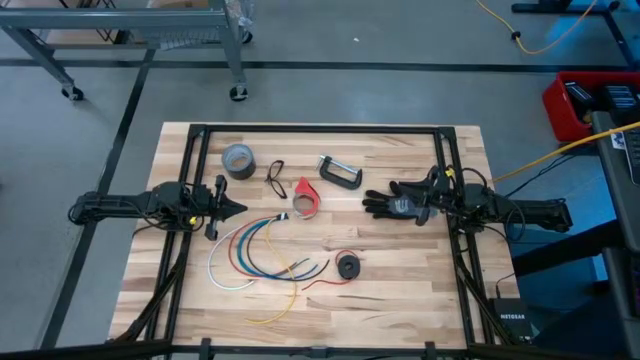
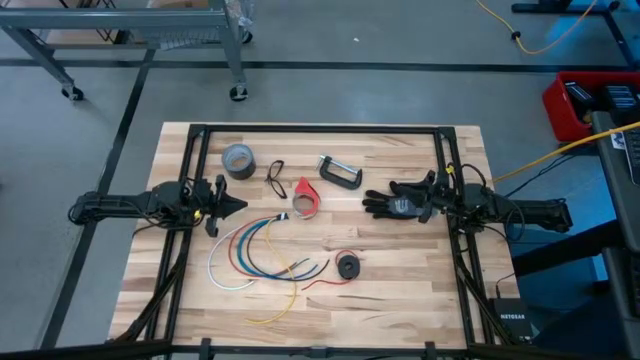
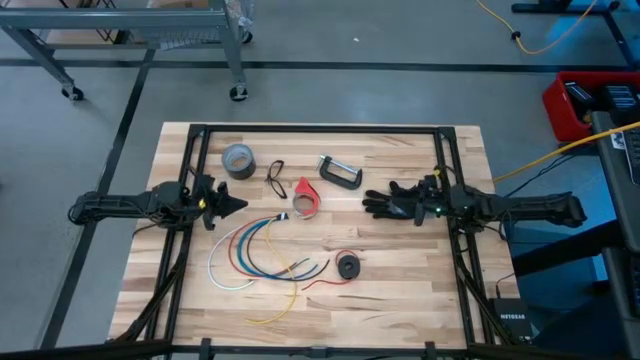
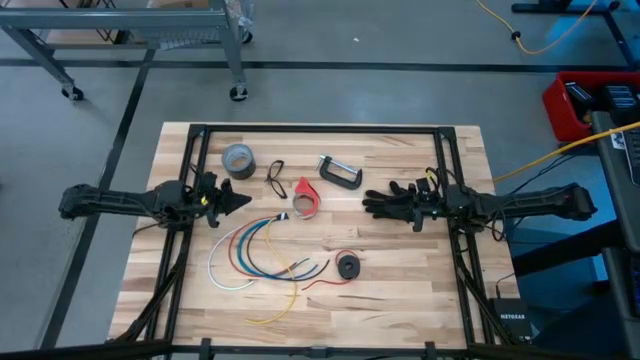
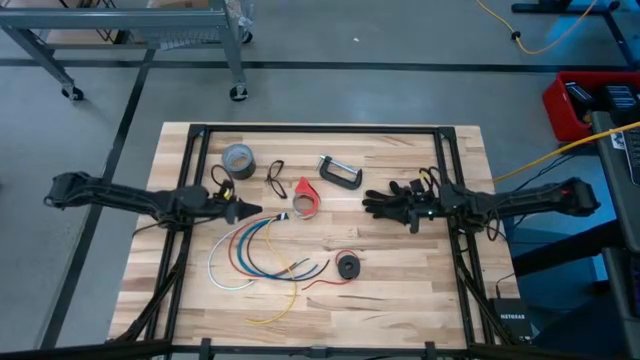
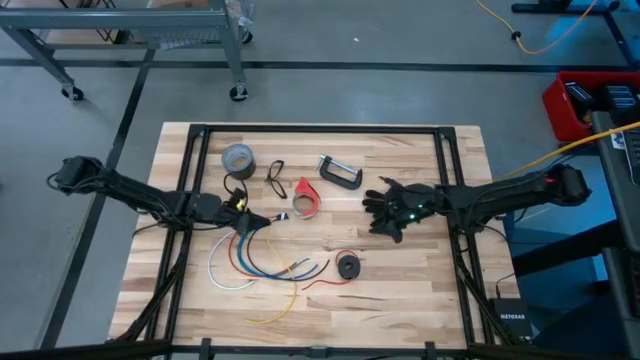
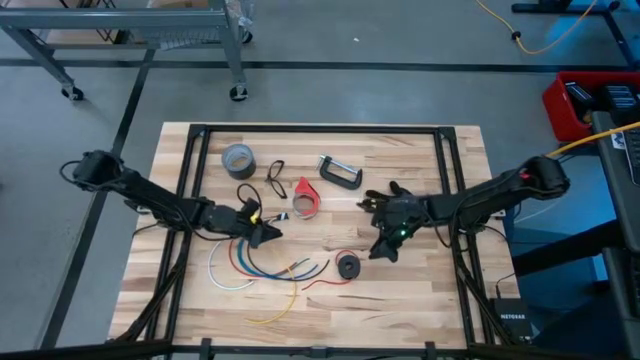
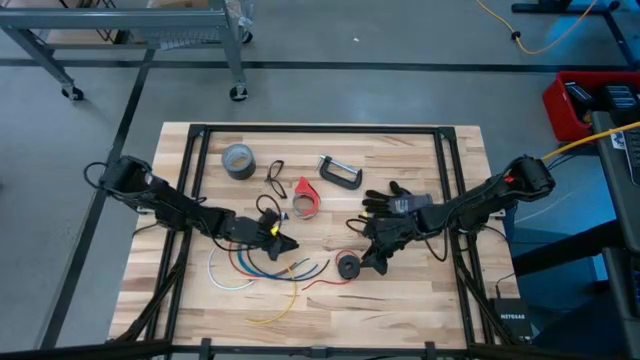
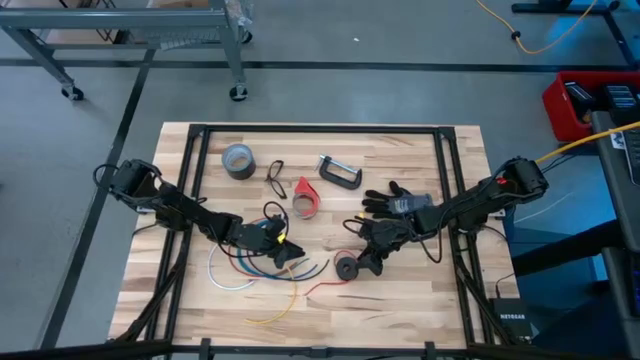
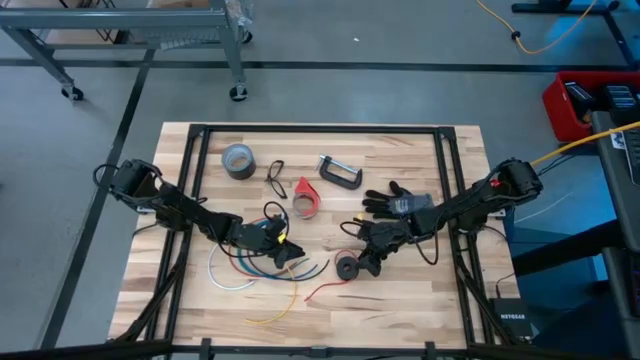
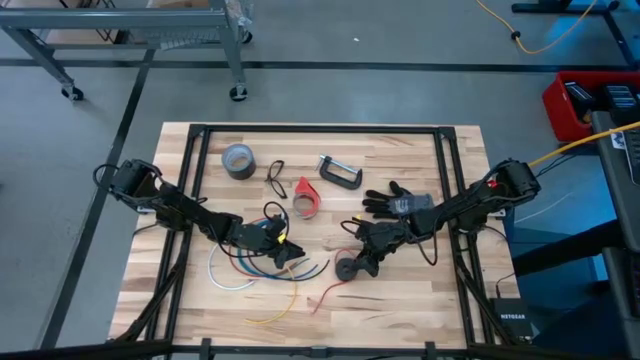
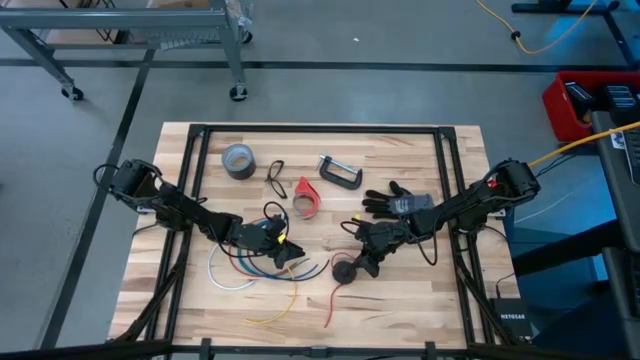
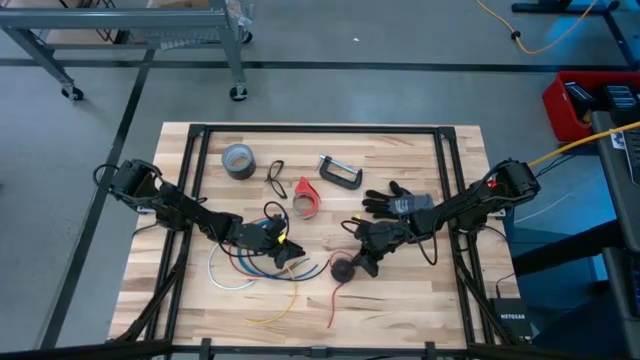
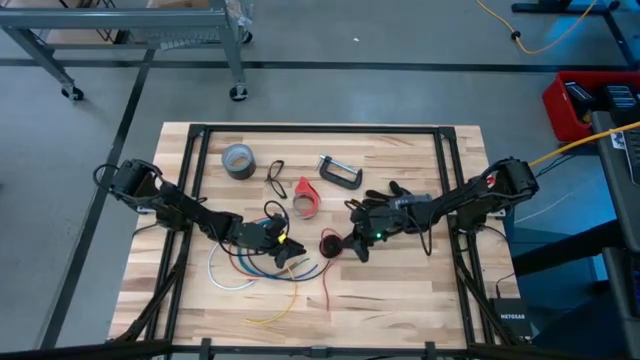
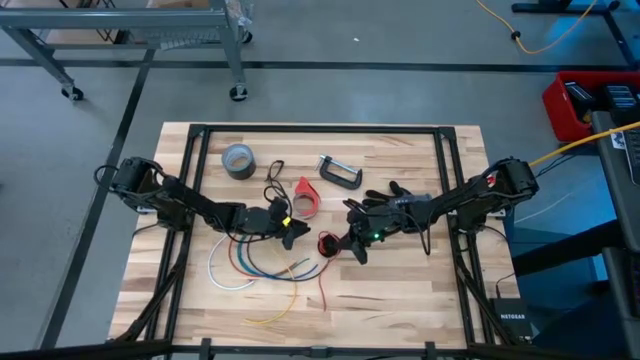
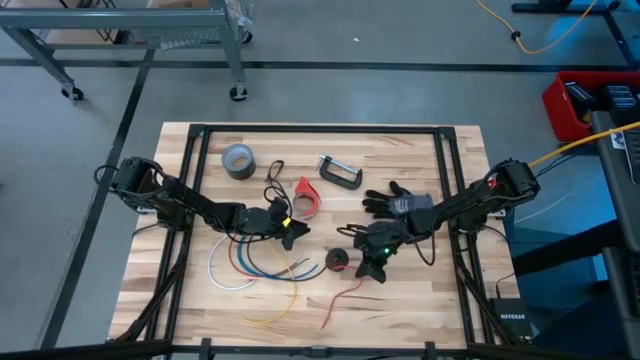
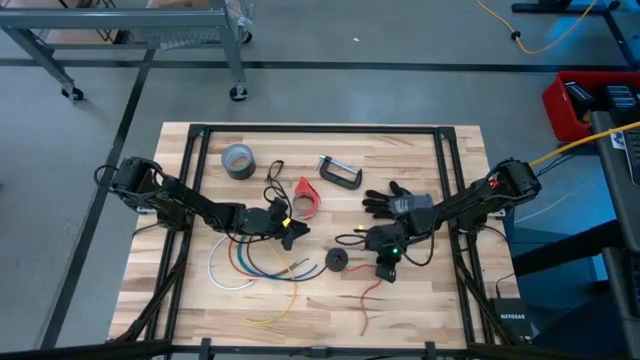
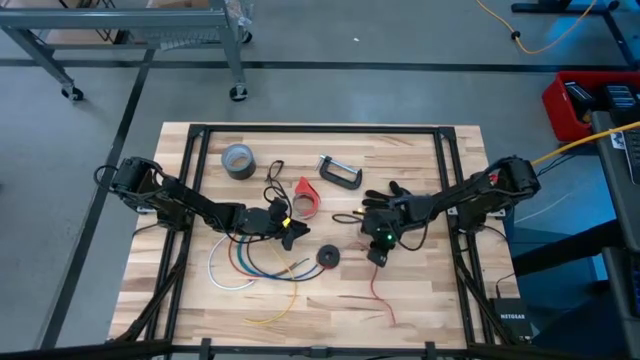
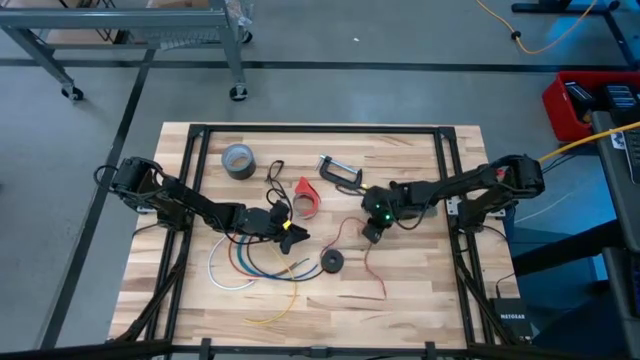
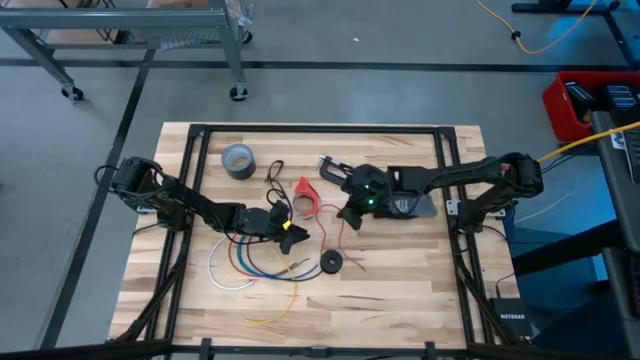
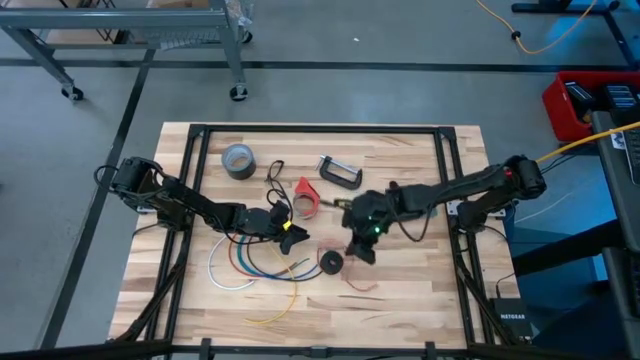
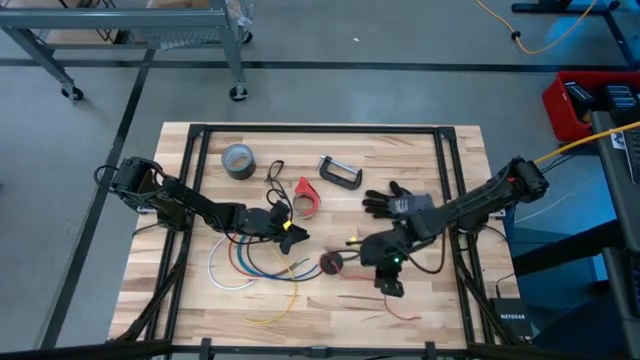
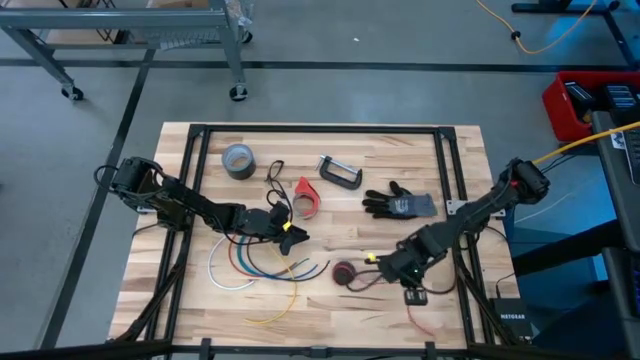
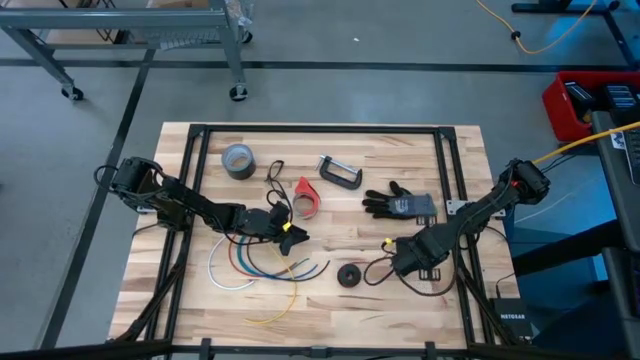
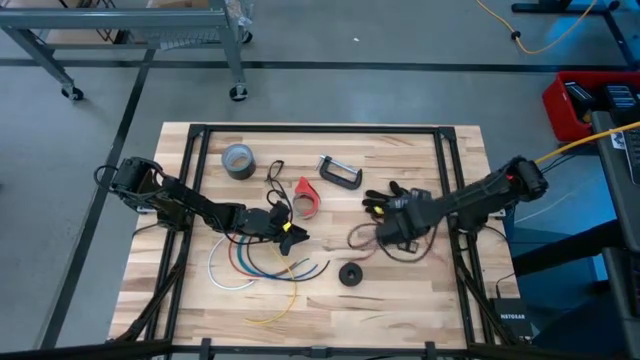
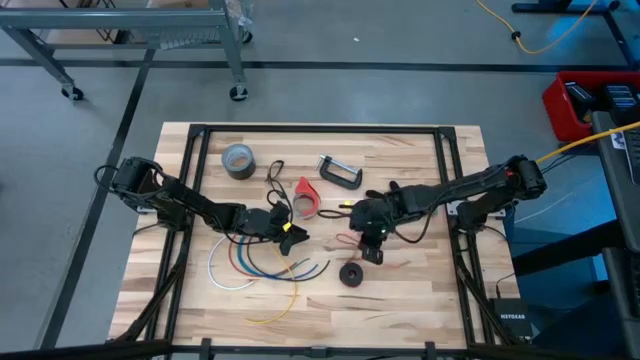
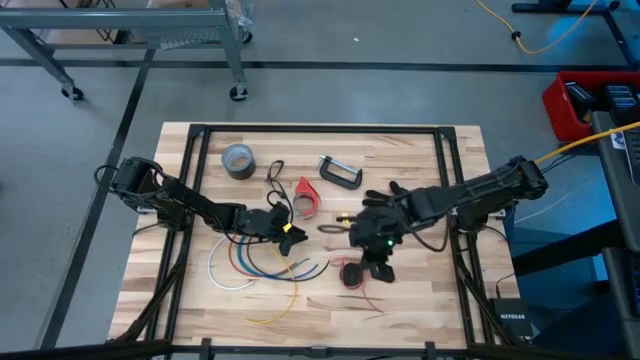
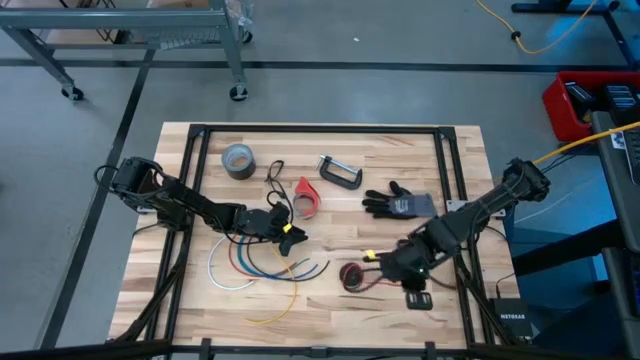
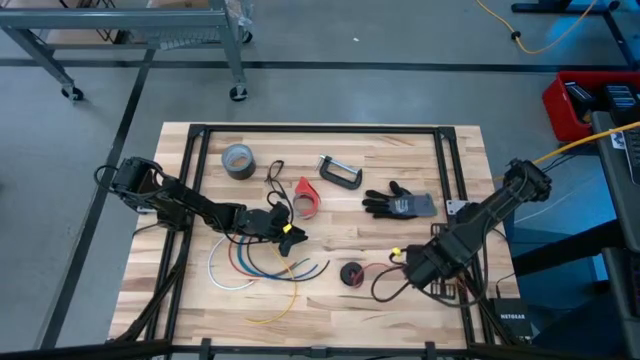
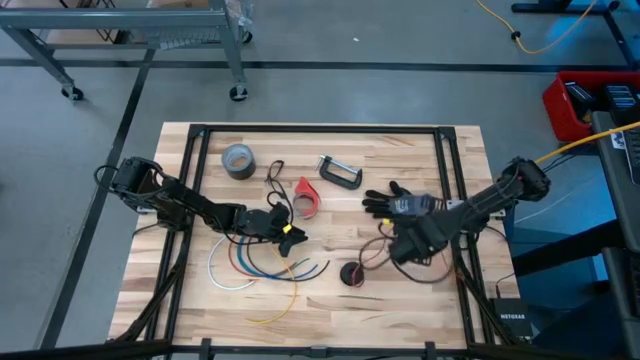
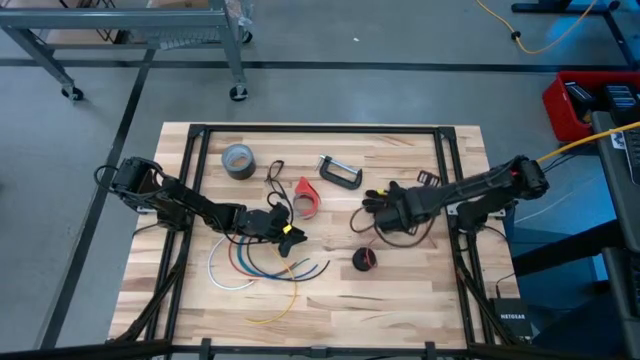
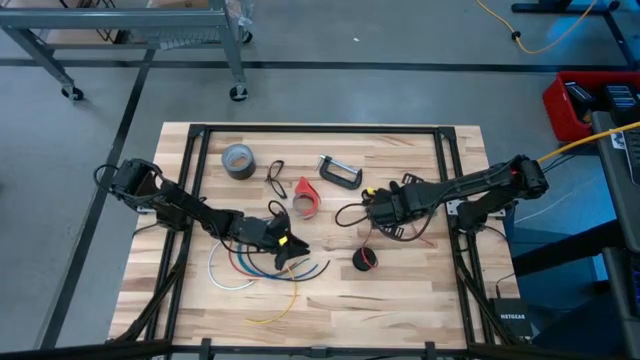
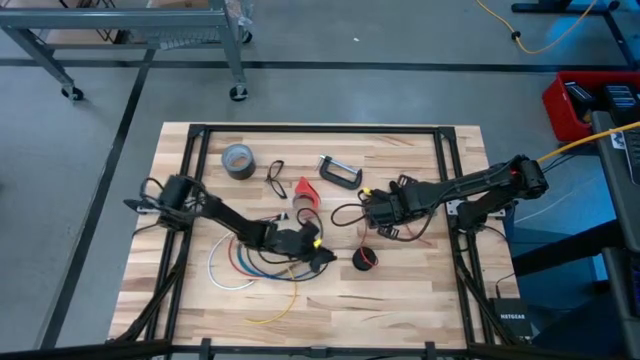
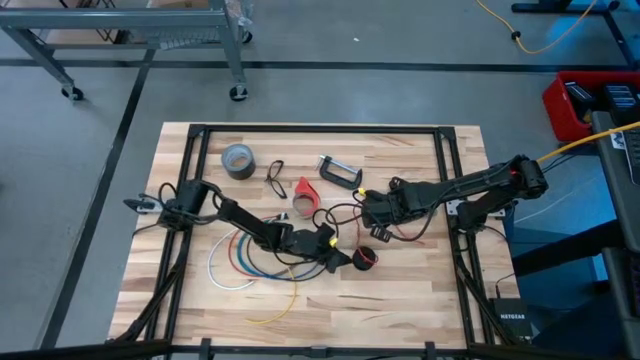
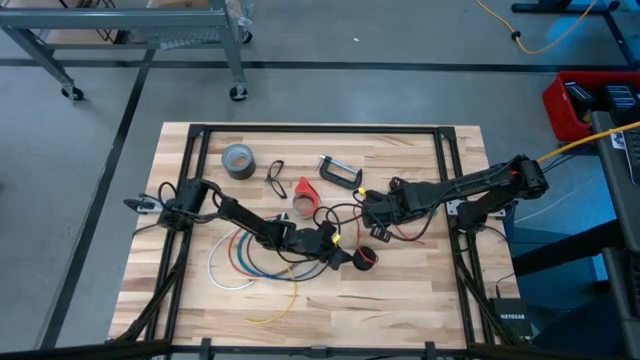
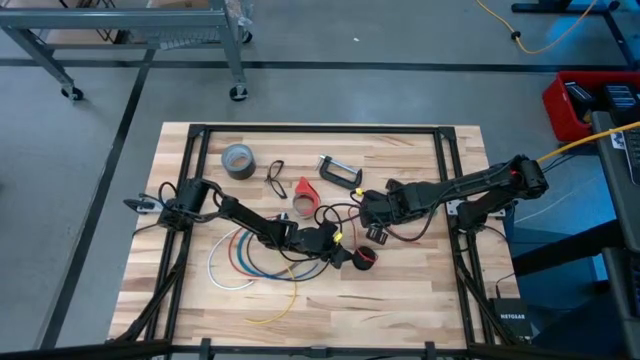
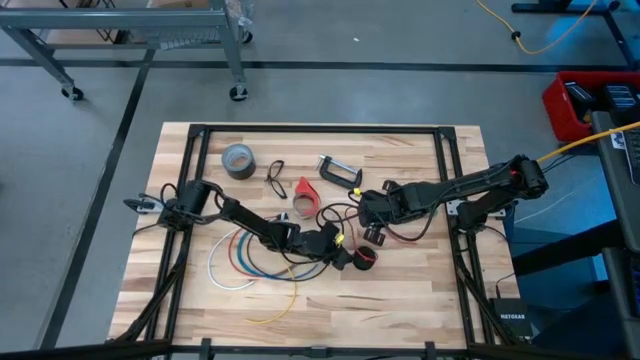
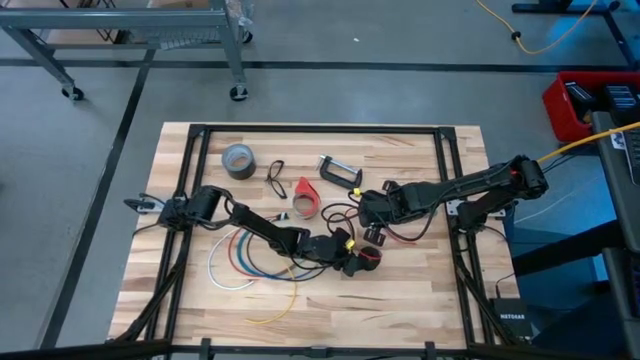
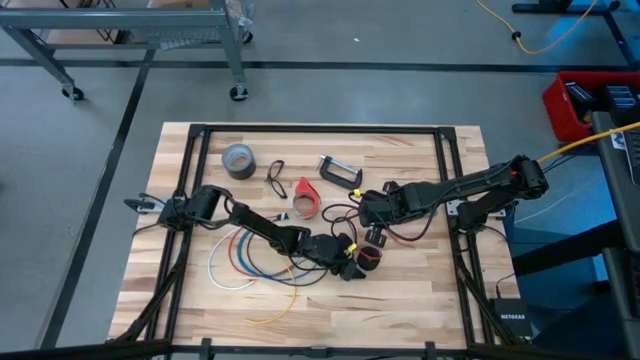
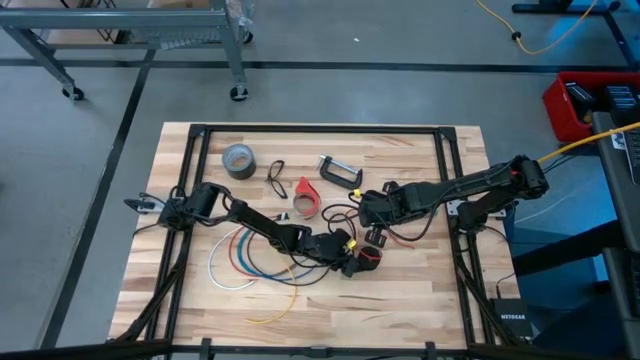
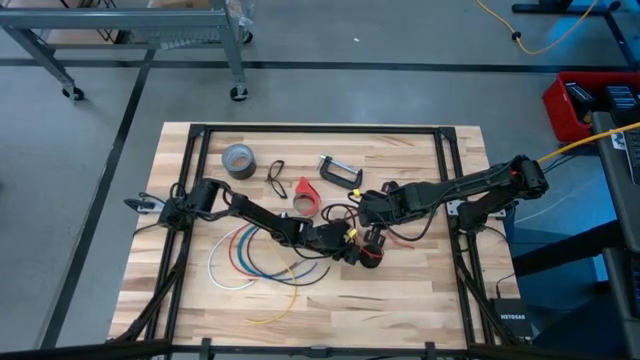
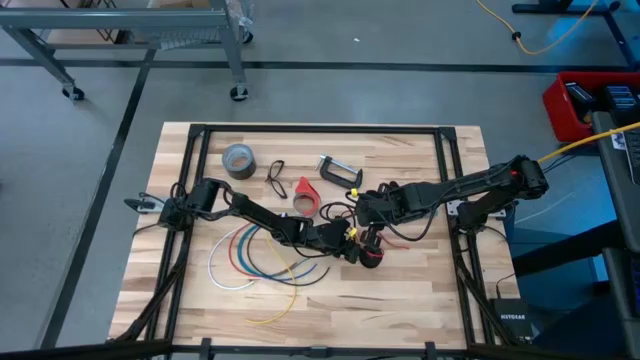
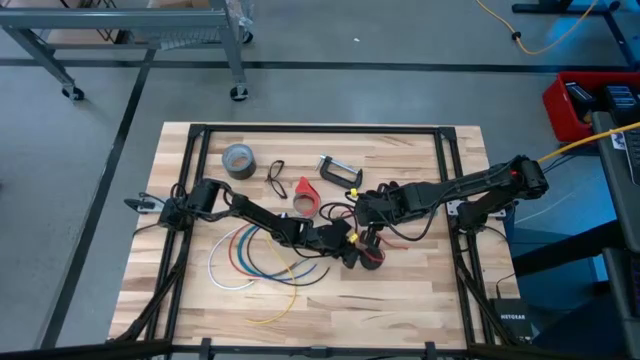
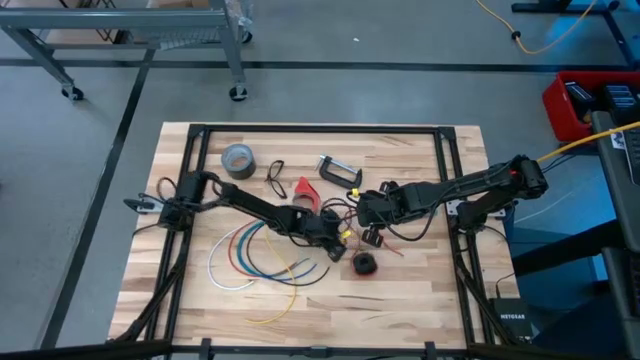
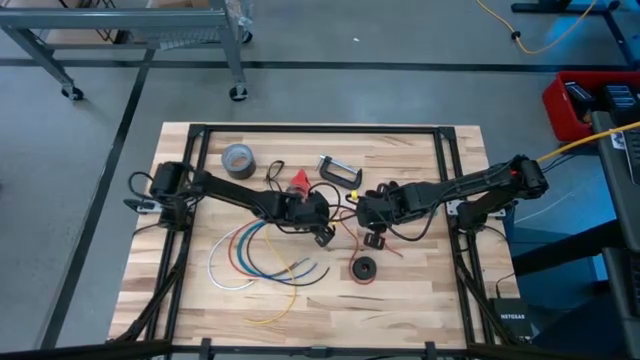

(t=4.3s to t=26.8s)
Task: Coil cords
Uncoil the orange wire from the spool
